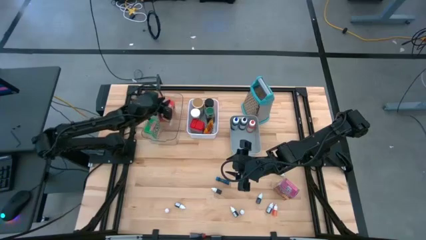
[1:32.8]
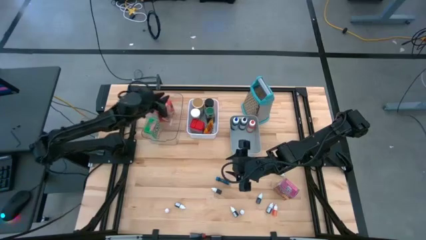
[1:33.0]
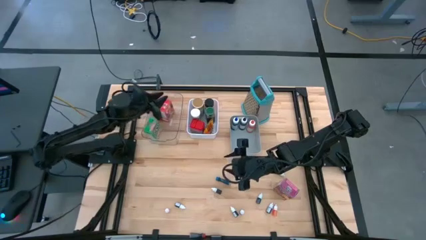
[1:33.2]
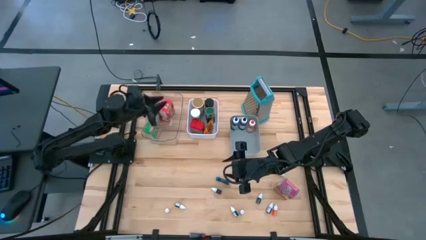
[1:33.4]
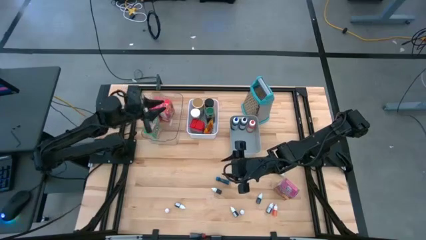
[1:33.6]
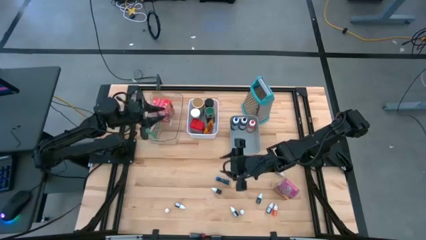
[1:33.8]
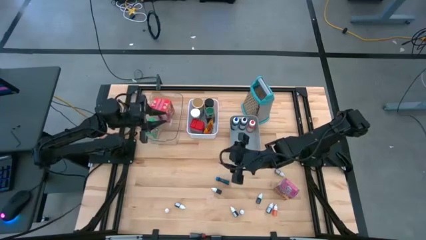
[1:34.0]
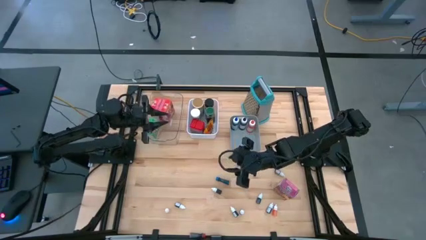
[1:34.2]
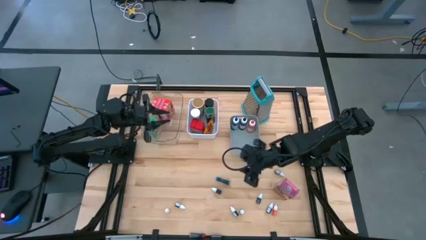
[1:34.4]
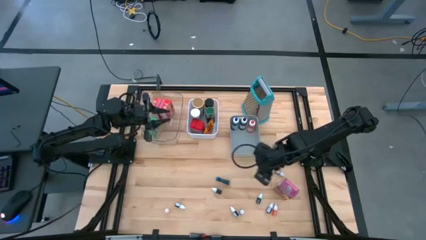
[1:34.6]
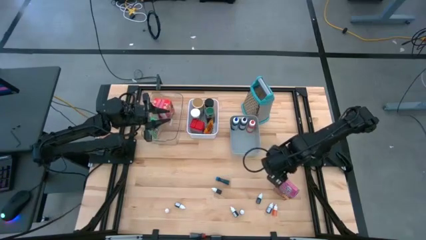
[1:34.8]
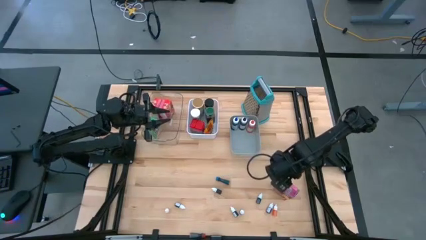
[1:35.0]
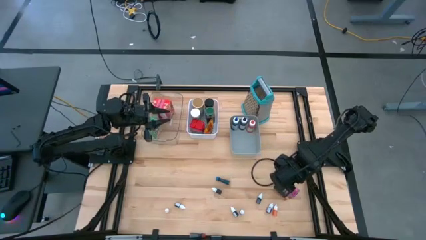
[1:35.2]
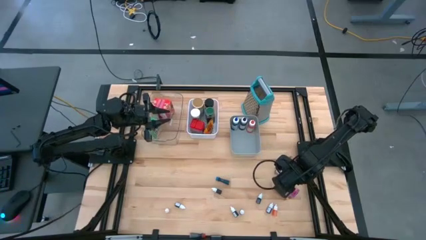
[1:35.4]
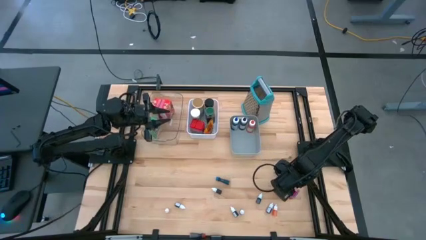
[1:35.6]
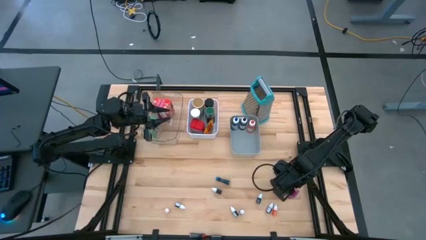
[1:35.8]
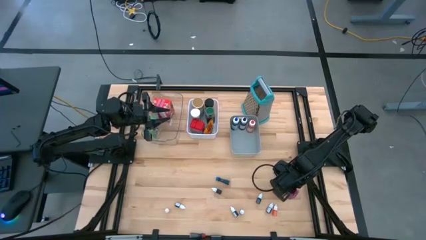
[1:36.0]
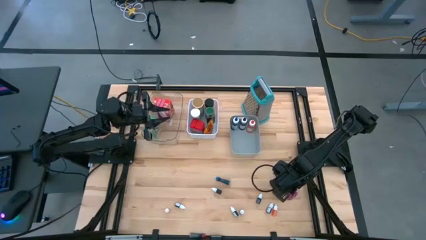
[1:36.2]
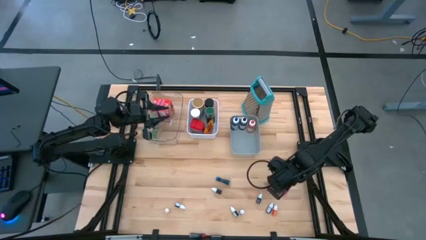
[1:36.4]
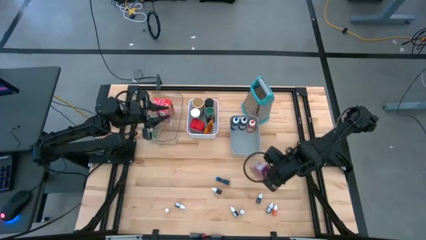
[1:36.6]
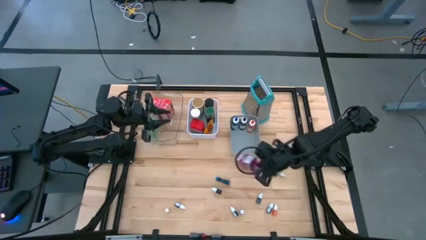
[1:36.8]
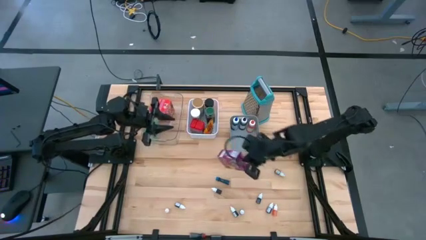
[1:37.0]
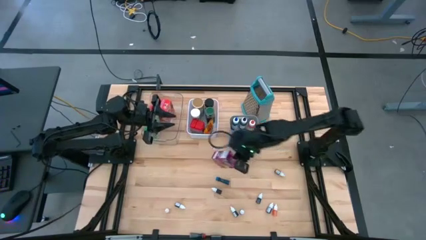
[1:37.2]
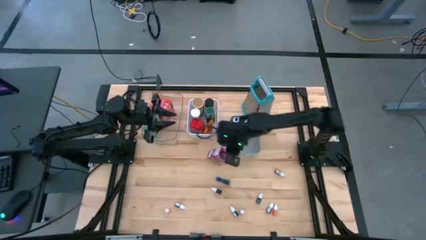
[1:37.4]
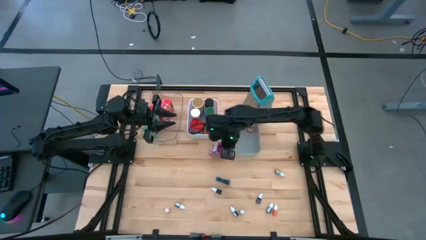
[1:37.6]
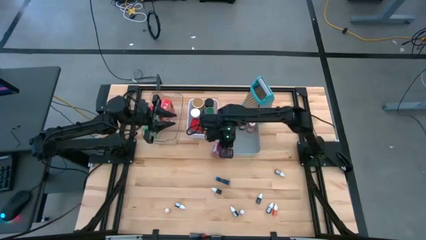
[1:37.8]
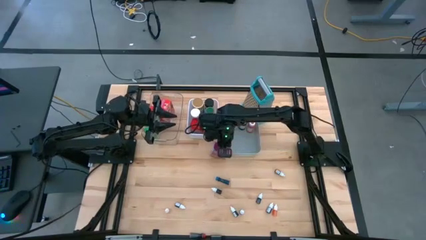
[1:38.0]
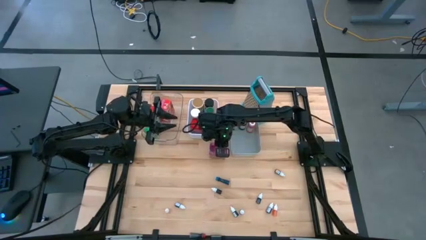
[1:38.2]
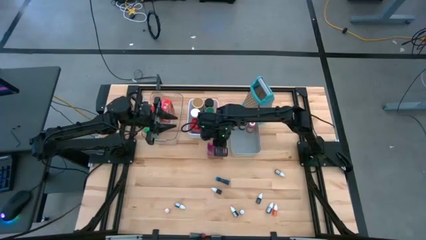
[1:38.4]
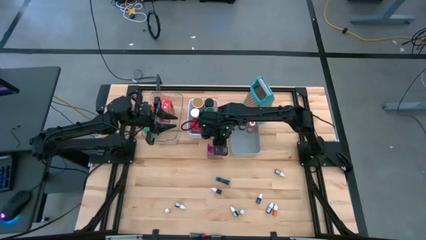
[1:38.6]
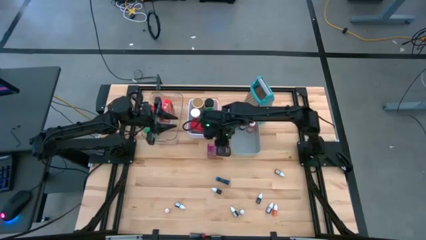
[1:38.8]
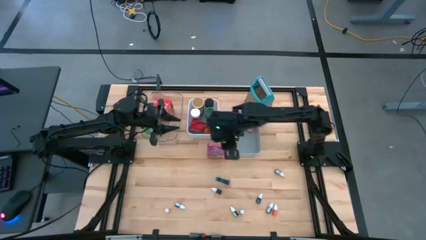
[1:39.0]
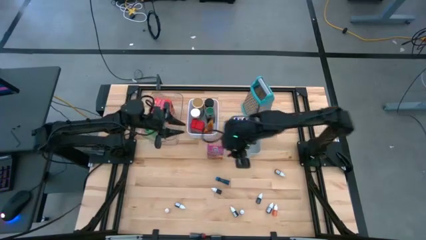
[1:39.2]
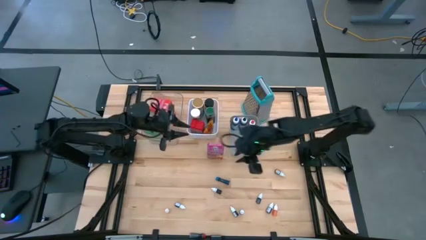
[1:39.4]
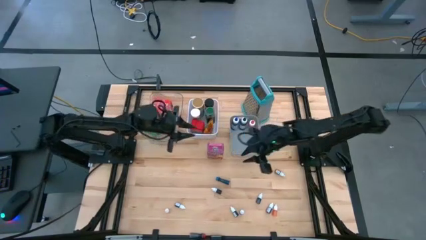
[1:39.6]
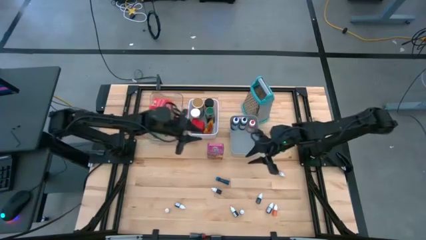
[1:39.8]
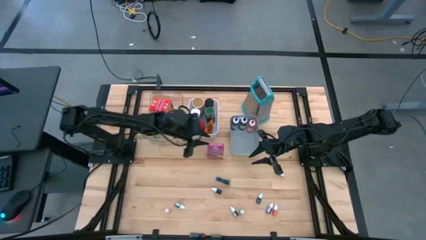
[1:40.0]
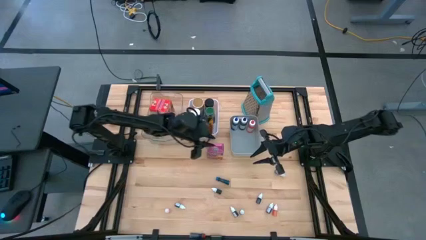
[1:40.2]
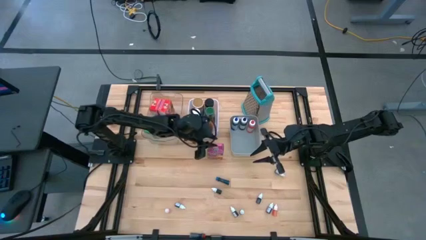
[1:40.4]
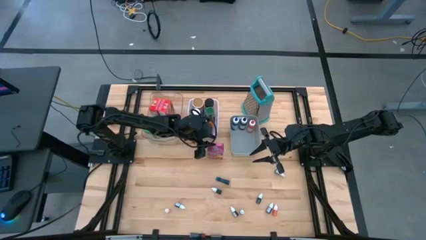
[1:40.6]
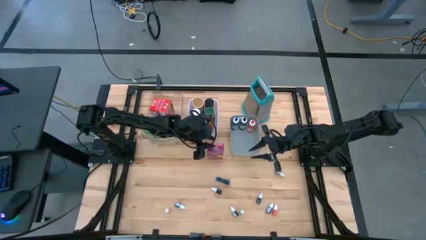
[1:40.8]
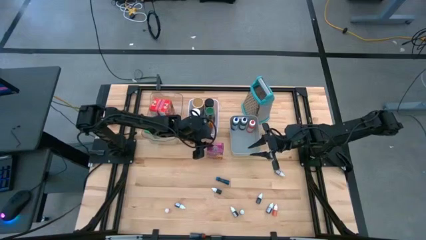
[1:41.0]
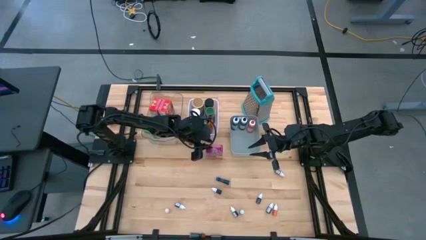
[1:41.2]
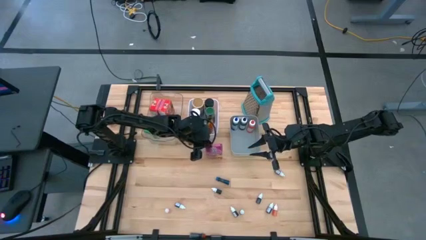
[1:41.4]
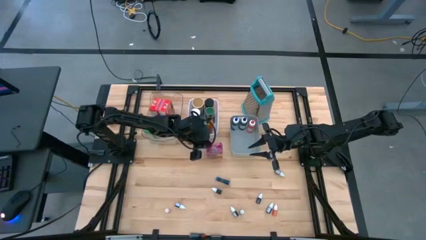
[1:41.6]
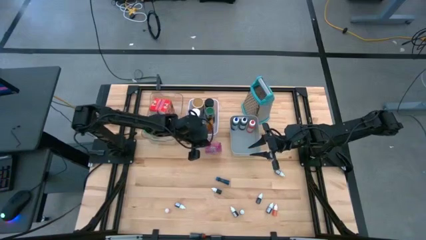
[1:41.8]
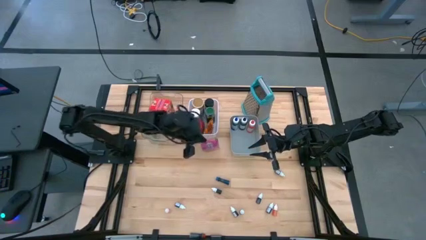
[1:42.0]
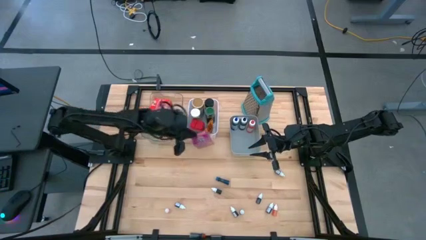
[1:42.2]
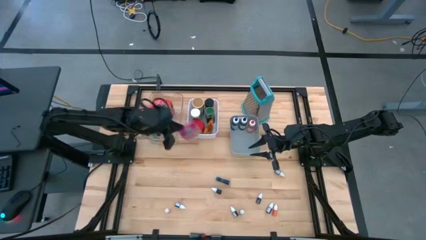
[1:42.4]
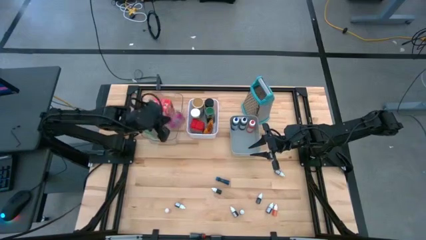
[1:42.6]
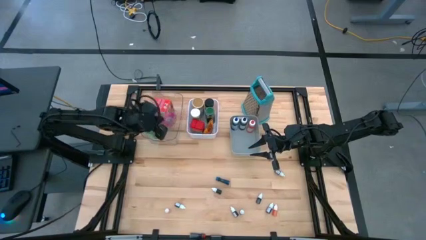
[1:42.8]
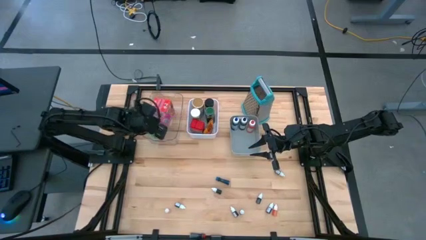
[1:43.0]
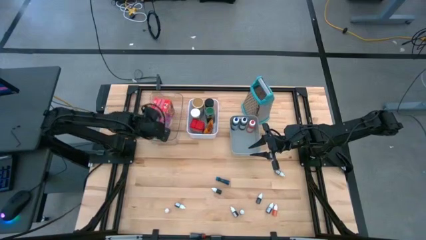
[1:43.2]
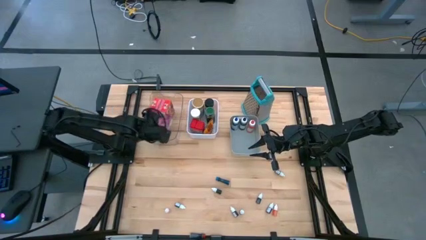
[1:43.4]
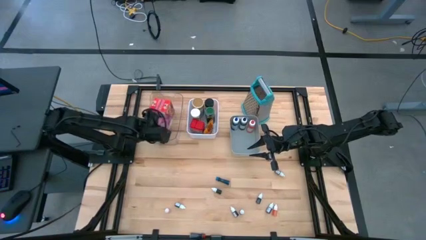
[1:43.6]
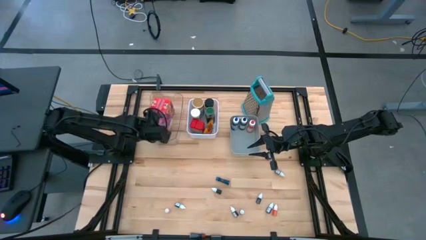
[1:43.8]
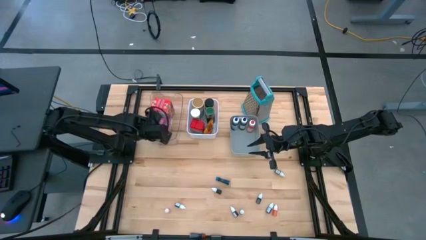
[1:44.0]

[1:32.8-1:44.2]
Task: Pick & Place Kitchen Items
Put the pink cereal box into the transparent bin

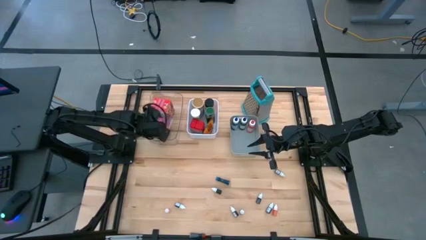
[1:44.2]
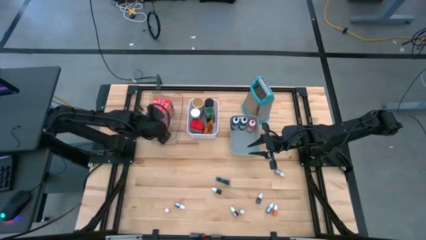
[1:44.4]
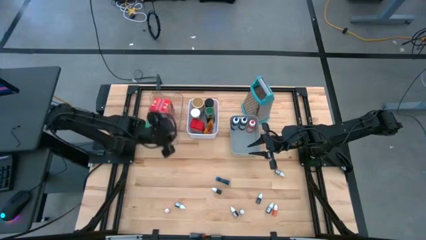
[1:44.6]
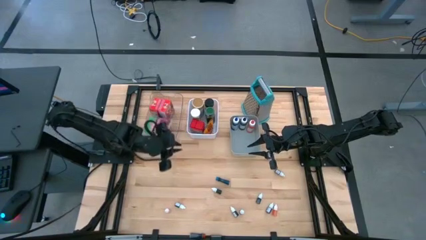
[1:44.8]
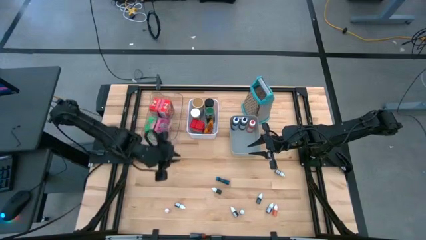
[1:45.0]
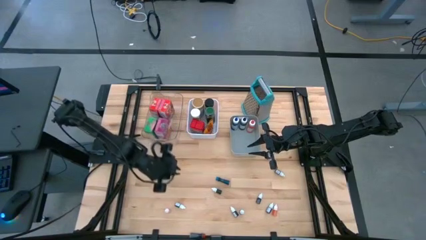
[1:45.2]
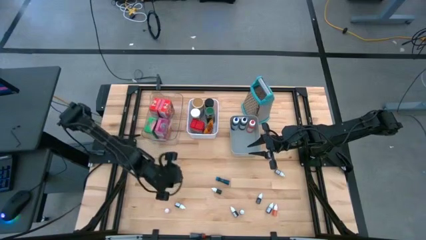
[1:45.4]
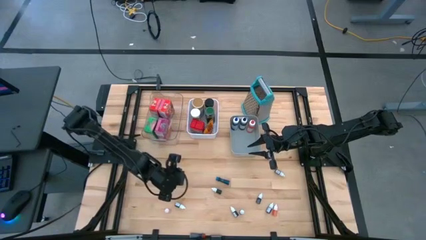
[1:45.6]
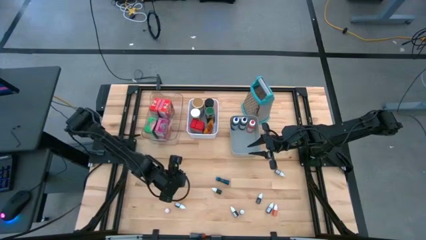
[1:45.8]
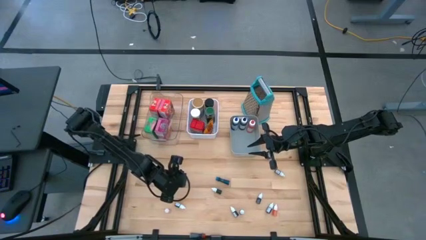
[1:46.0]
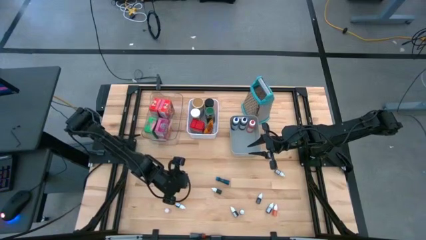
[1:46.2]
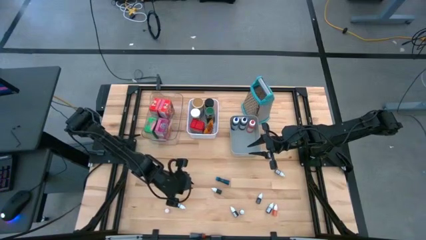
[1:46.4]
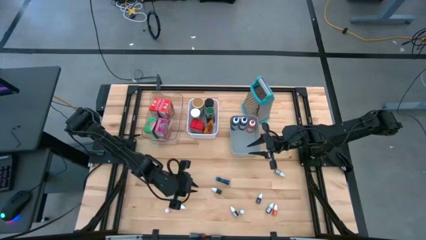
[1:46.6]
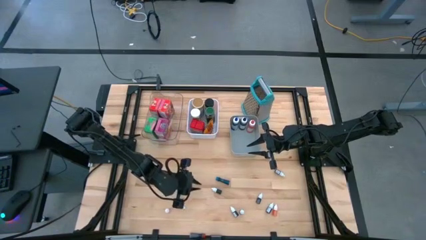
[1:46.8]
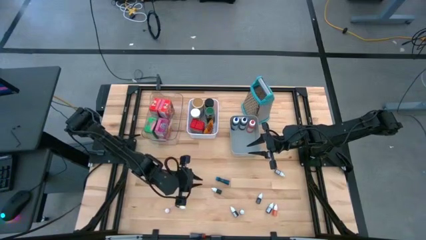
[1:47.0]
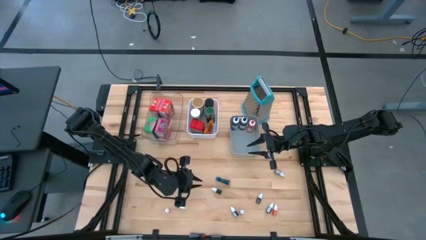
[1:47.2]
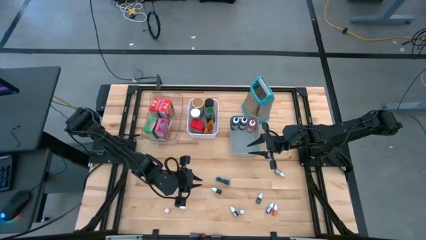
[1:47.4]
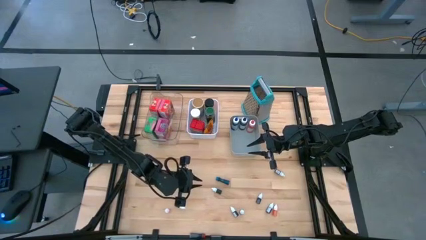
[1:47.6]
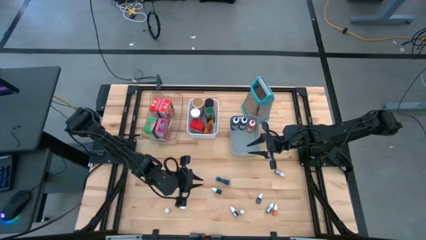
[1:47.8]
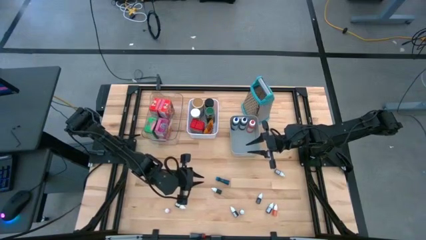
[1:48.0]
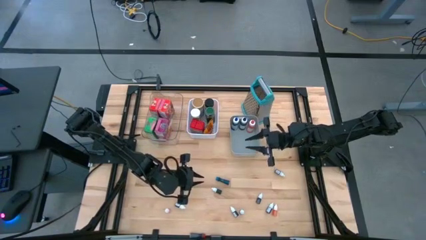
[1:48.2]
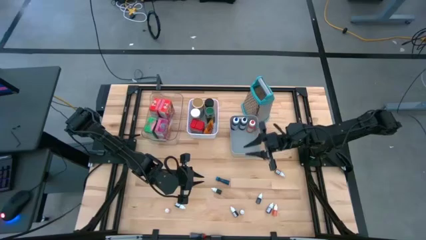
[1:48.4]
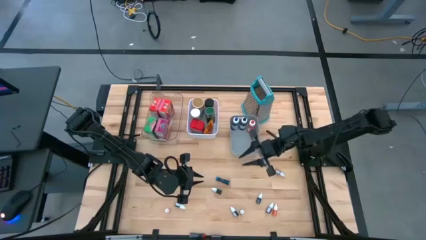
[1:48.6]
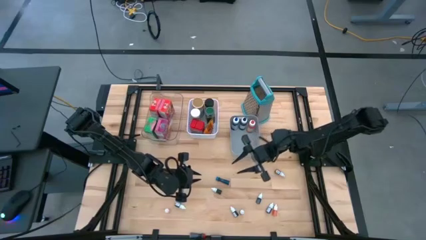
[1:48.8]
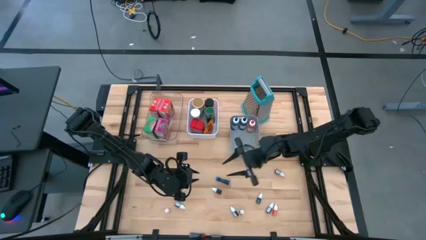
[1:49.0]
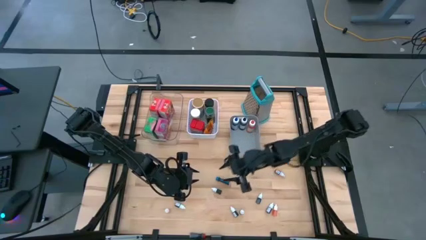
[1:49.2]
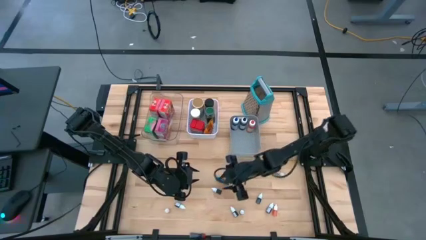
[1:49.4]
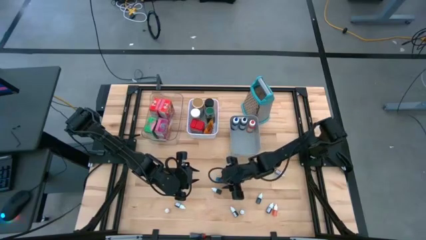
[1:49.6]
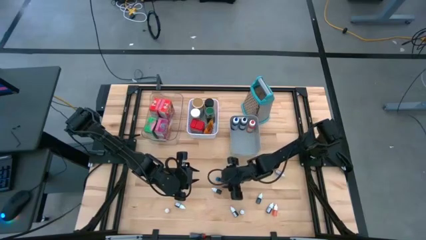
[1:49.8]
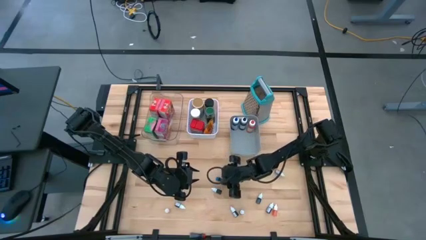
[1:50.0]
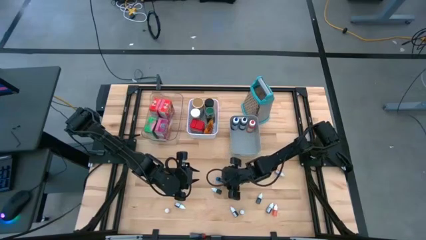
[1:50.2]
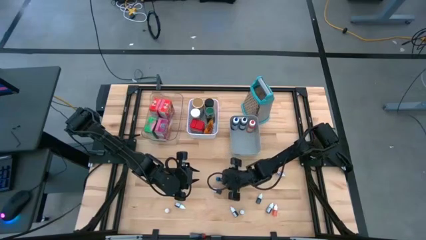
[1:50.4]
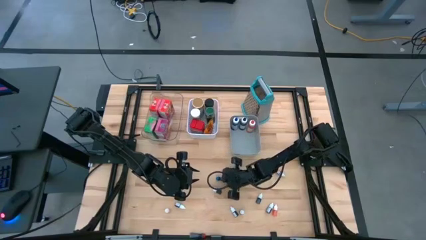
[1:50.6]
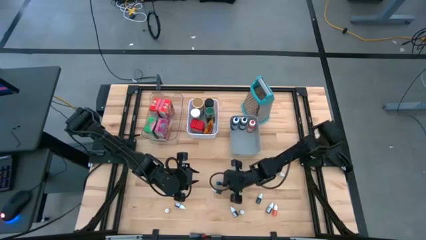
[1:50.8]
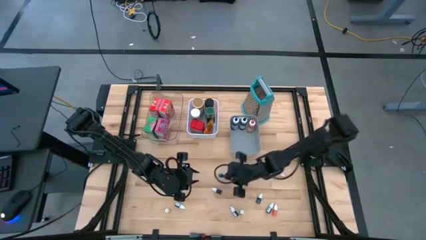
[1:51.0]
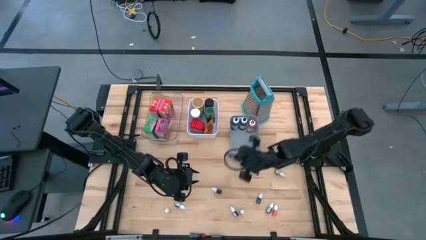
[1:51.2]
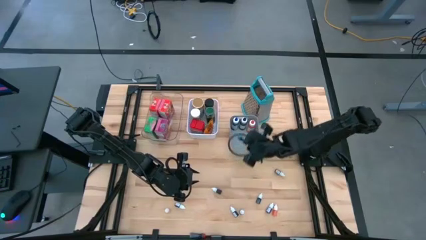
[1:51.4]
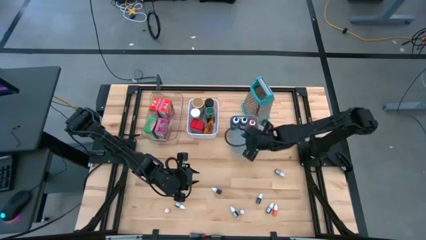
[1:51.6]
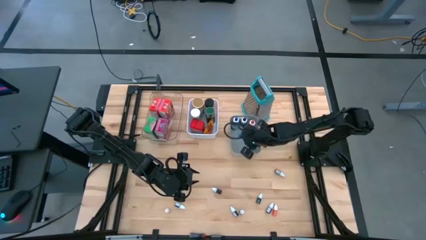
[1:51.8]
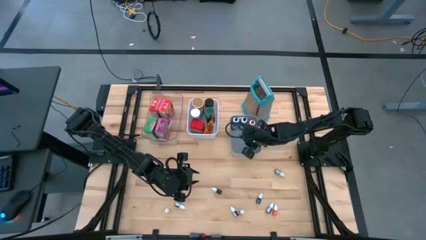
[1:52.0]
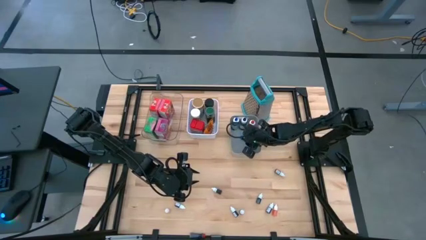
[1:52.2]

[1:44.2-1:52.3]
Put the small blue food coloring into the gray bin
